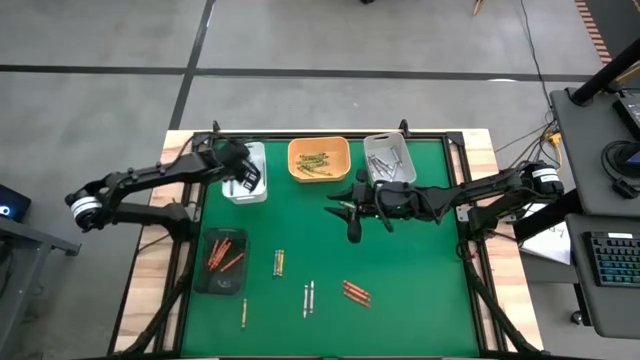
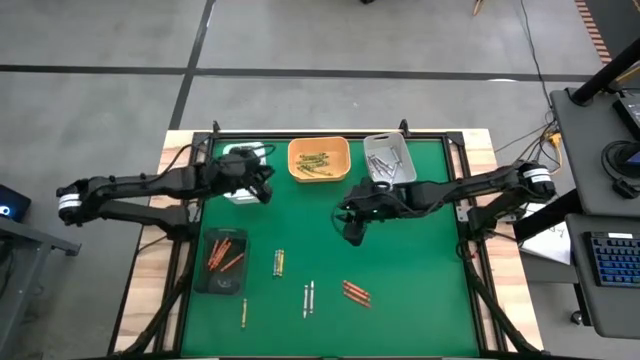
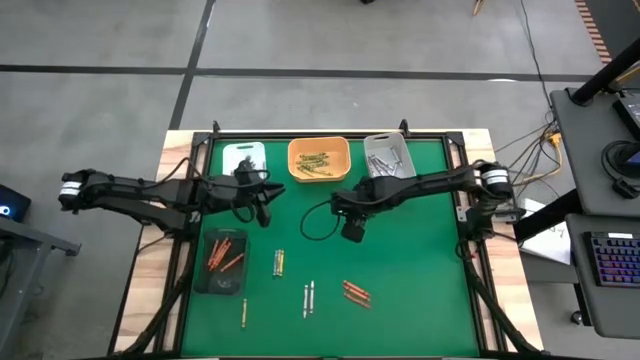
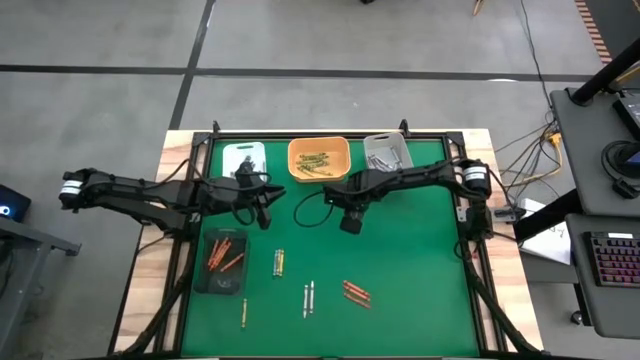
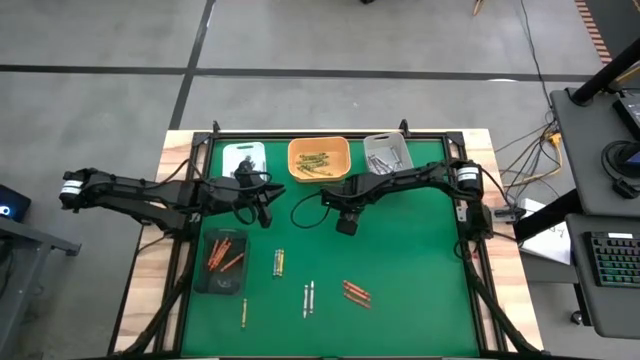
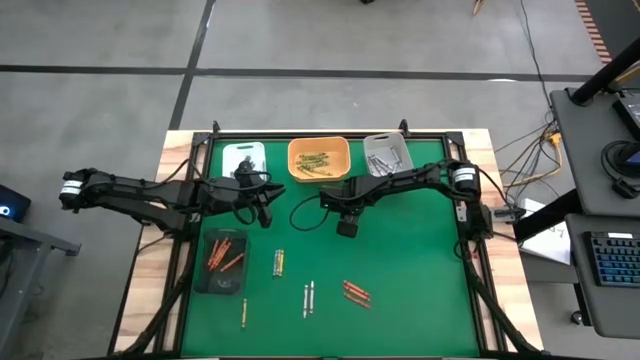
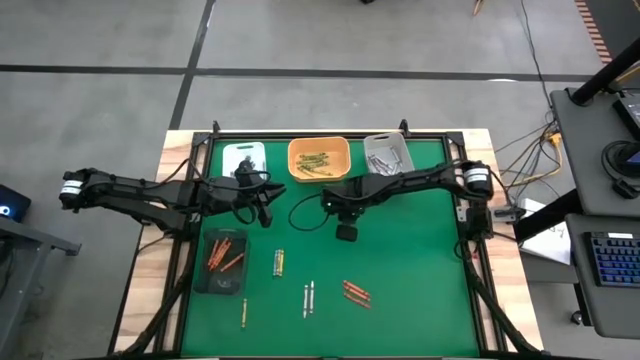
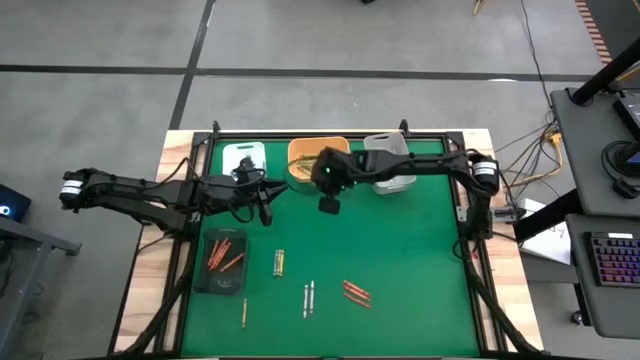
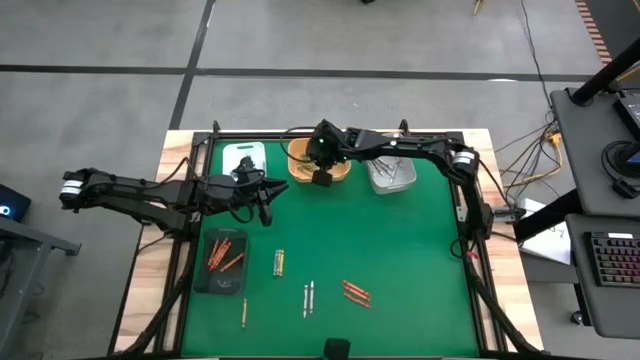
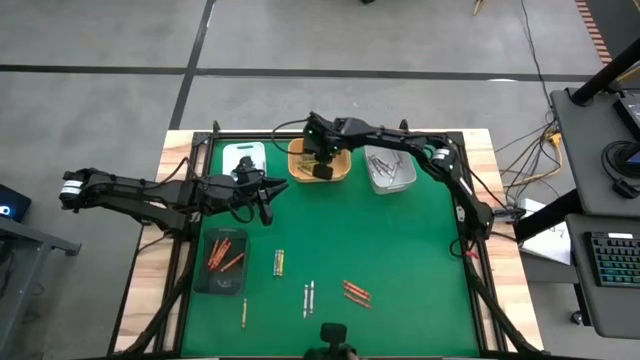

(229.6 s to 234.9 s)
Task: Sort crayons
Put the green crayon into the yellow bin

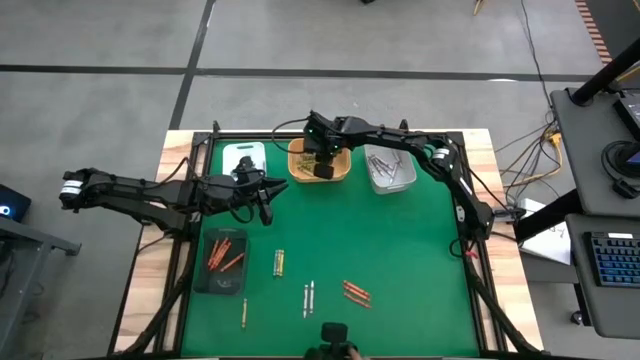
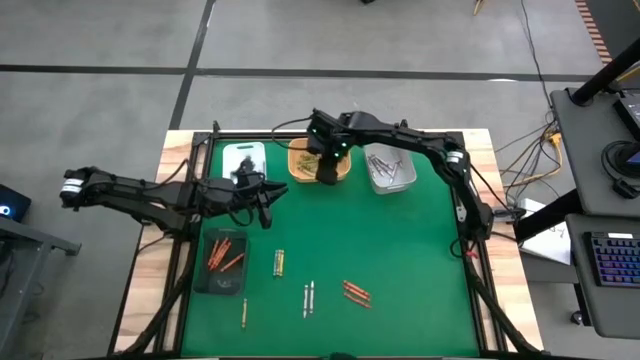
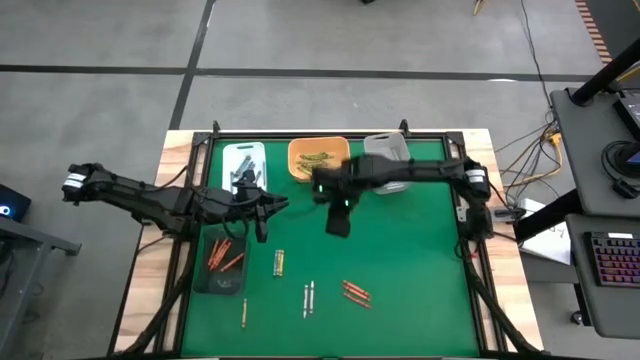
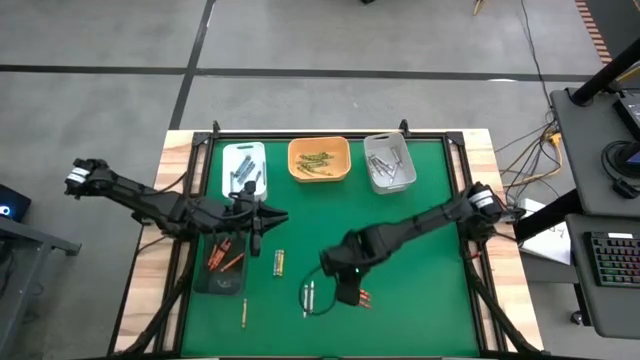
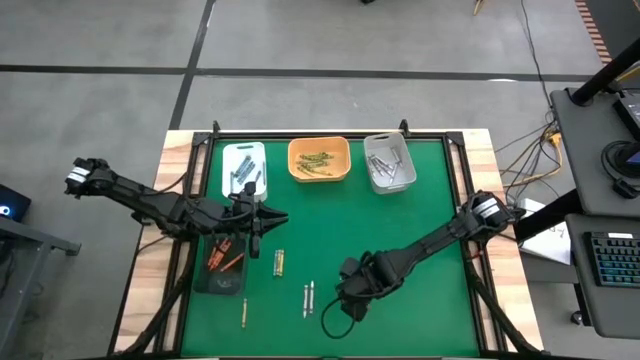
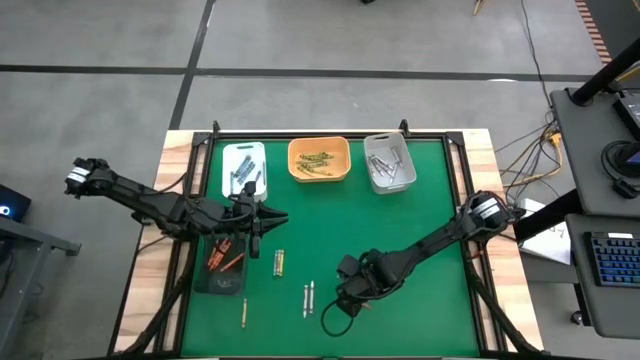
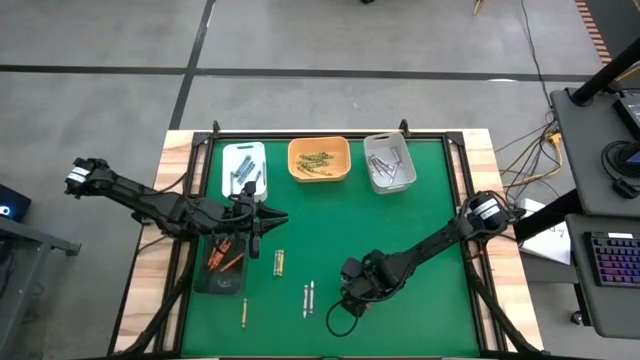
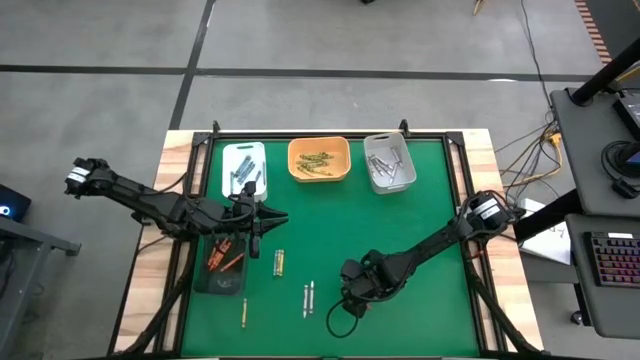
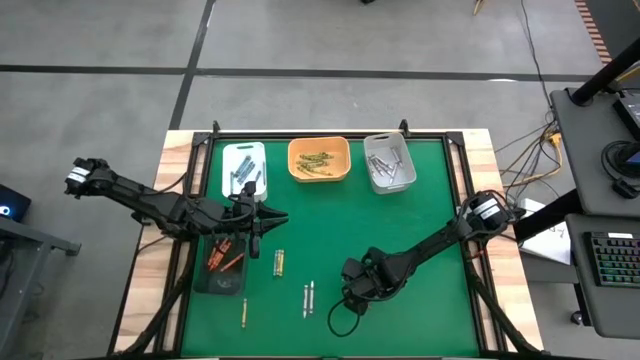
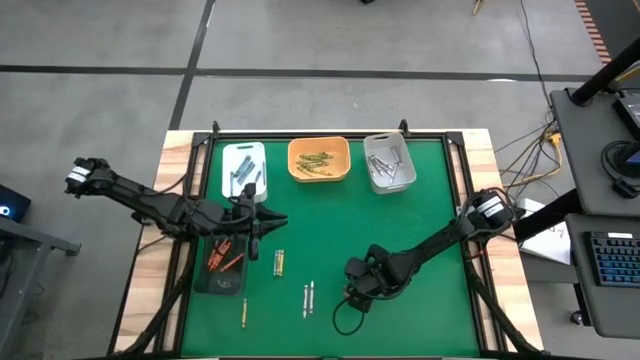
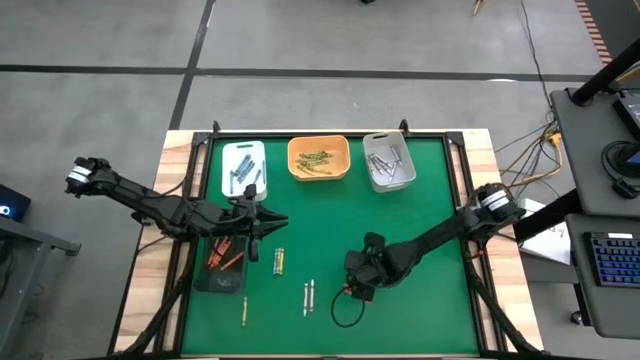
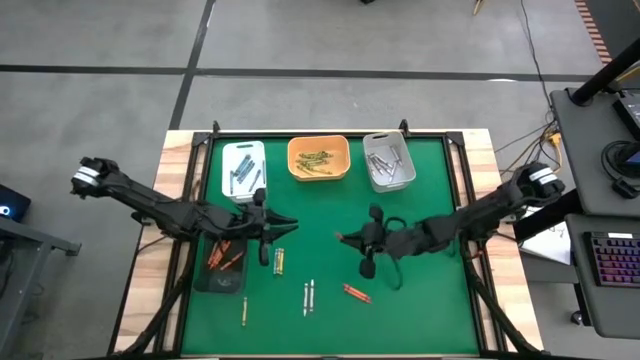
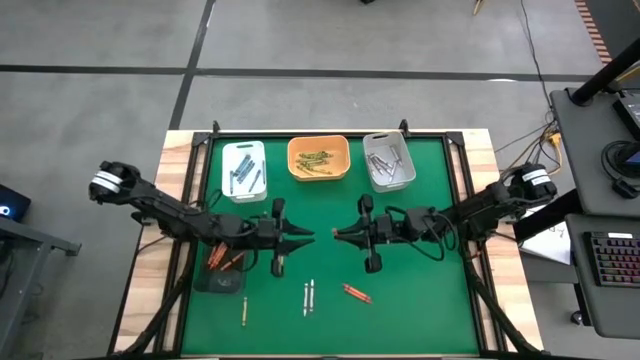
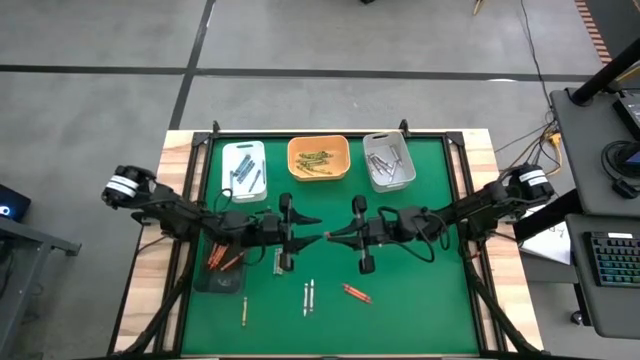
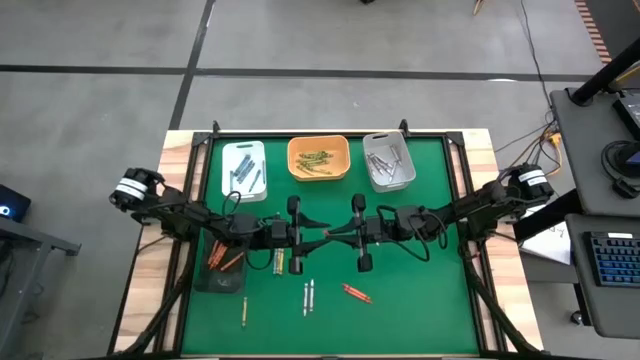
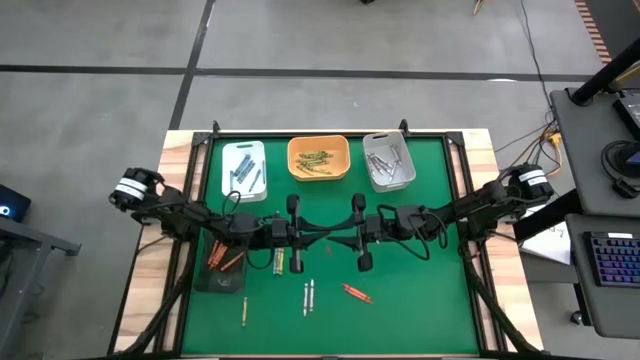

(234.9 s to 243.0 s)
Put the orange crayon into the black bin

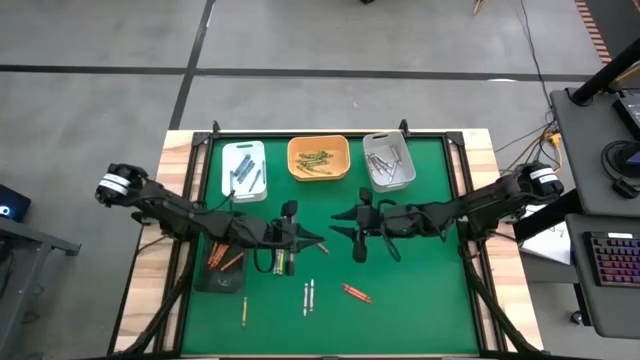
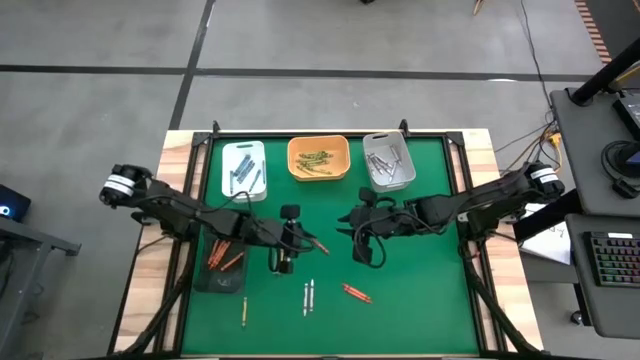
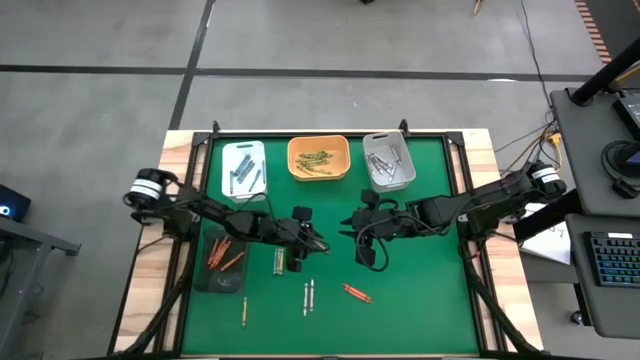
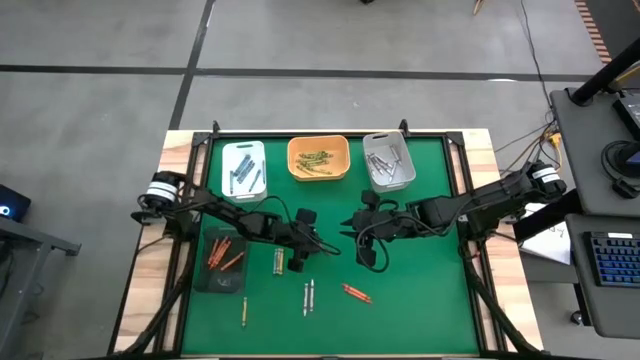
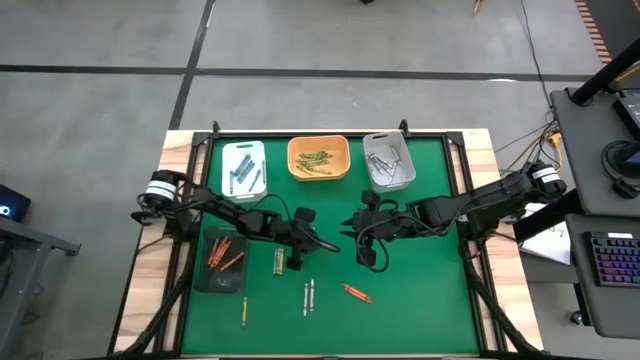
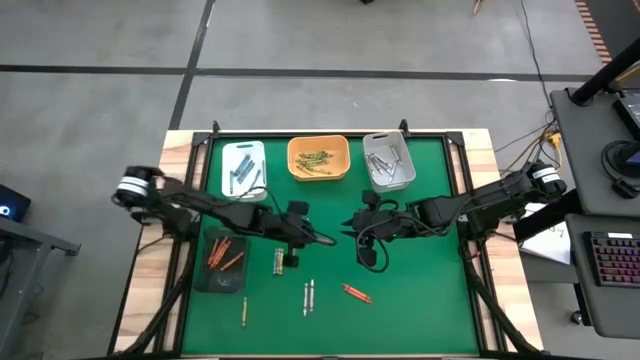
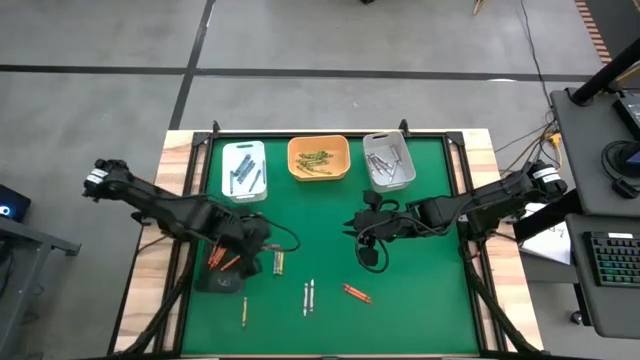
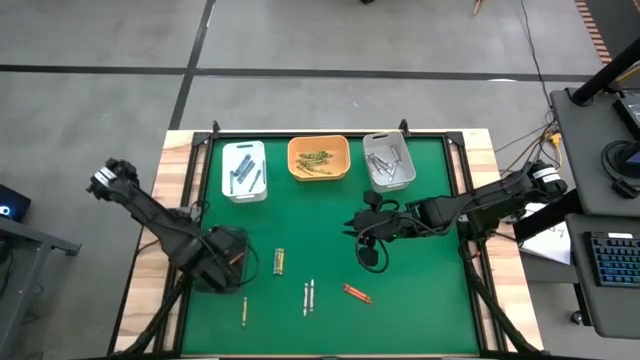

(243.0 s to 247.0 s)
Put the orange crayon into the black bin

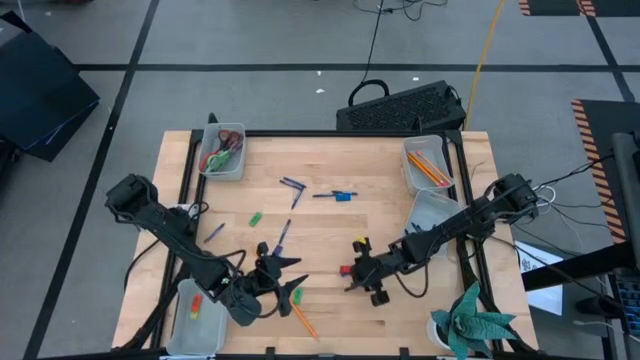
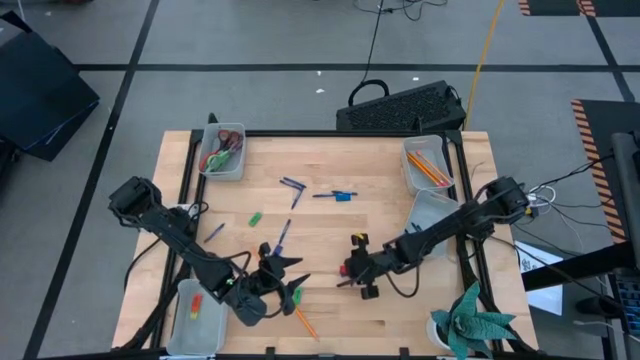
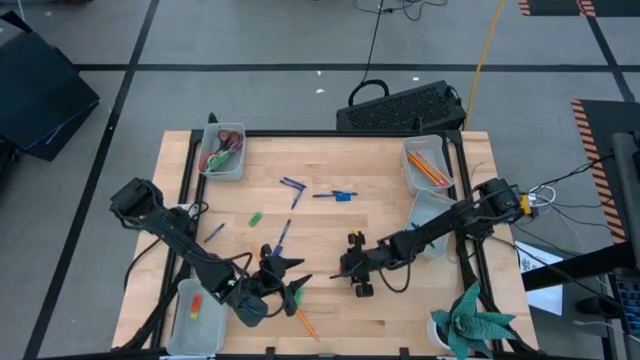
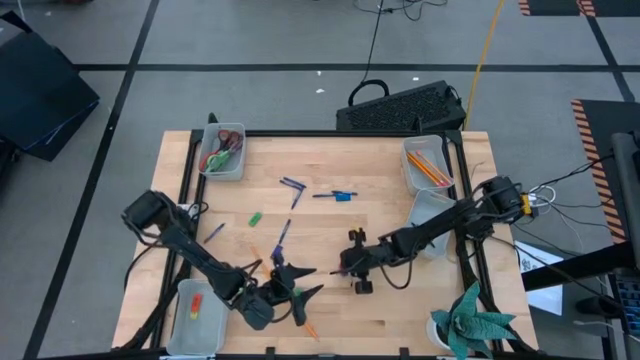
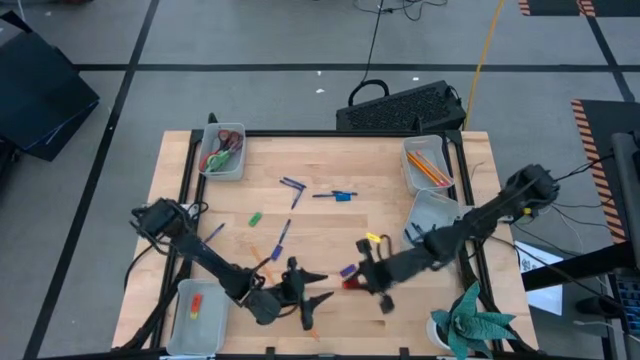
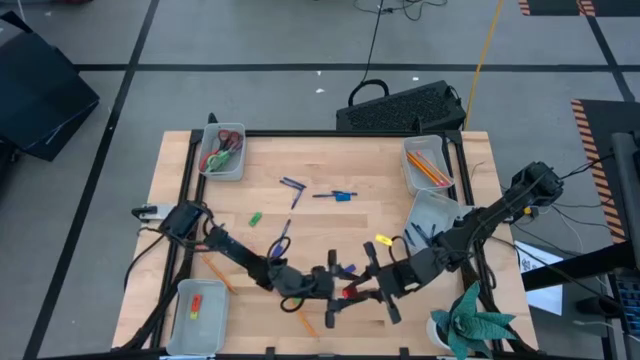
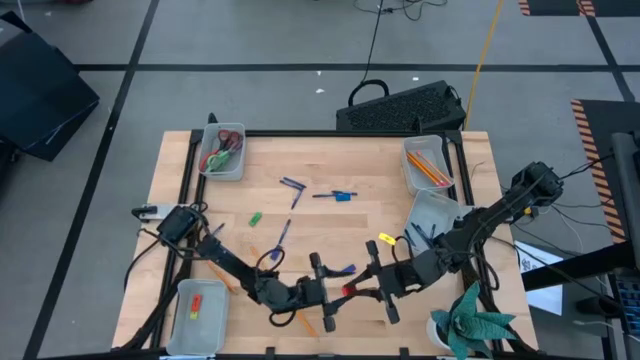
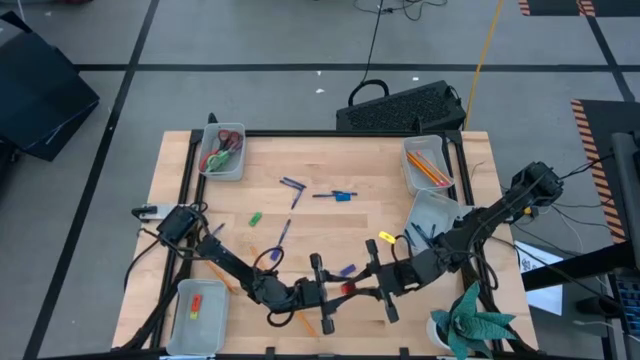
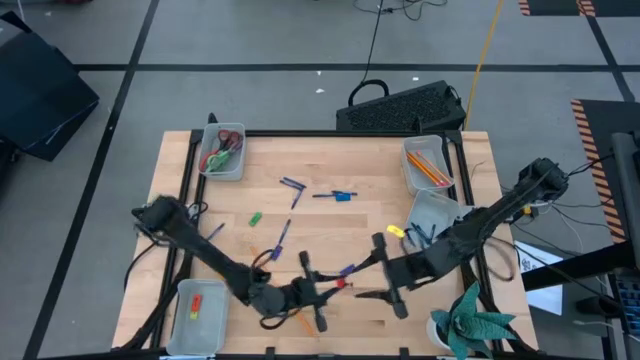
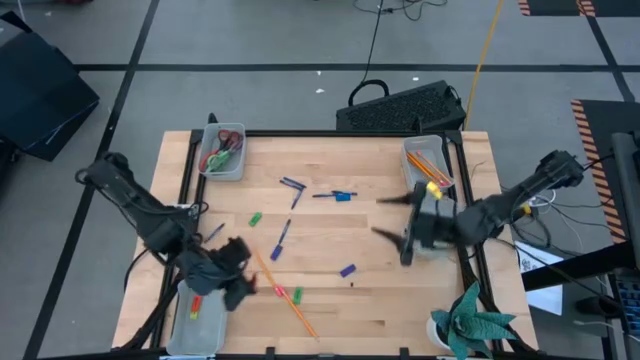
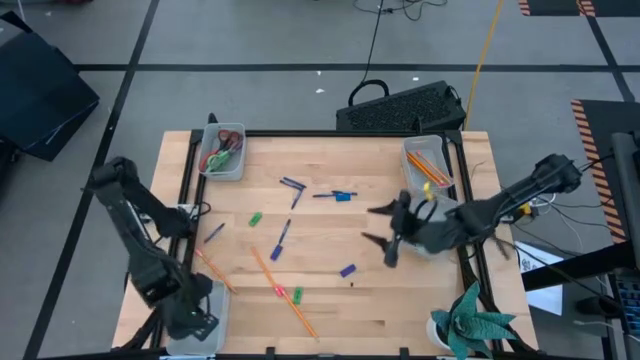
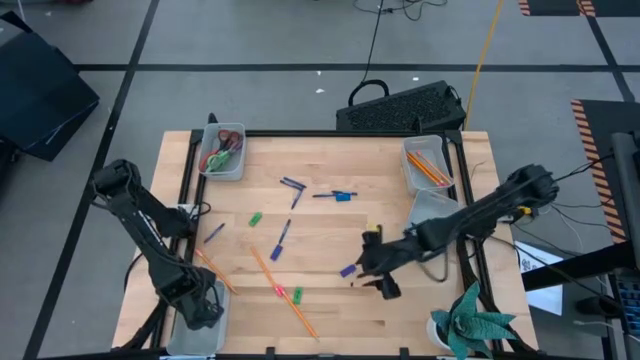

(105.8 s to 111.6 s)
Task: Sort crayons/erasers/pens/pencils in bins
Put the red eraser into the bottom left gray bin
